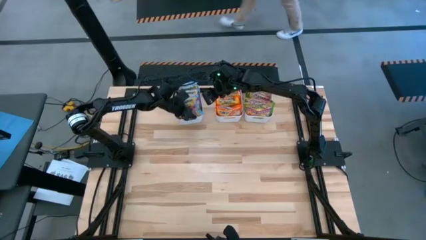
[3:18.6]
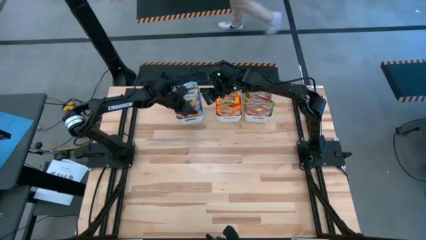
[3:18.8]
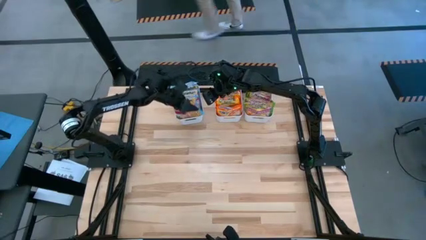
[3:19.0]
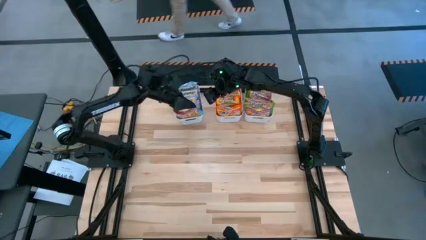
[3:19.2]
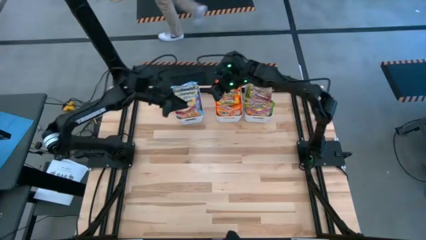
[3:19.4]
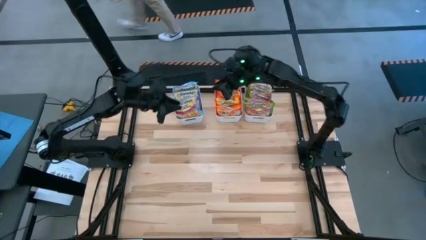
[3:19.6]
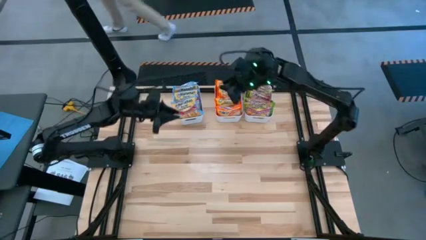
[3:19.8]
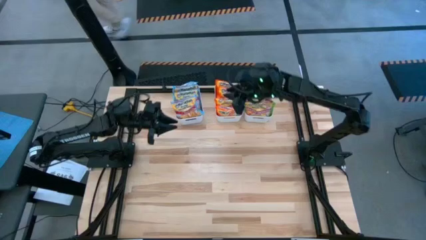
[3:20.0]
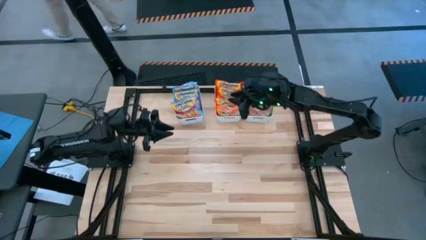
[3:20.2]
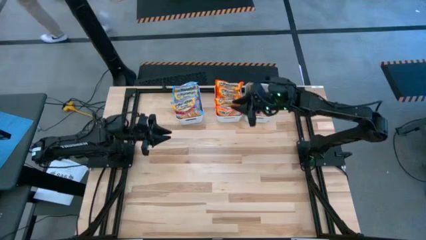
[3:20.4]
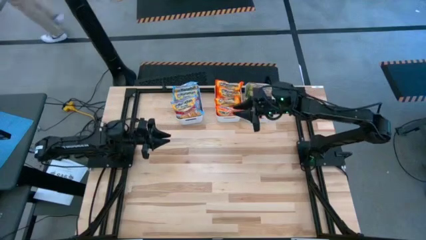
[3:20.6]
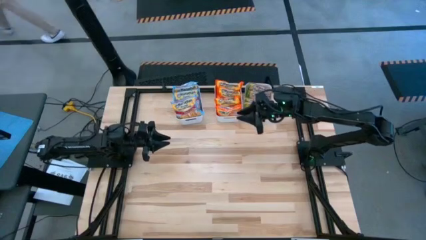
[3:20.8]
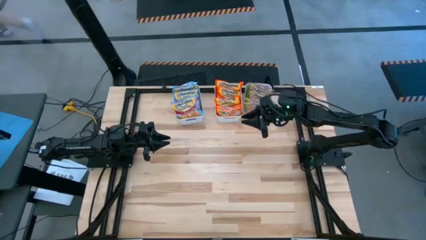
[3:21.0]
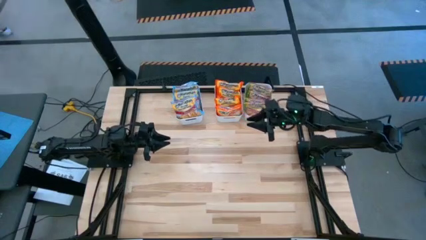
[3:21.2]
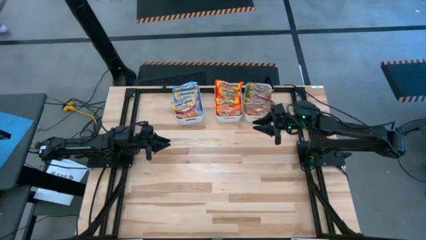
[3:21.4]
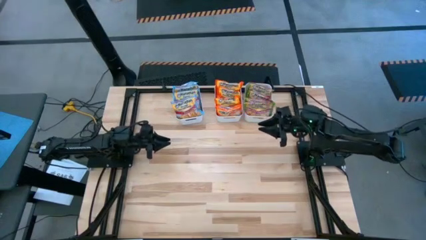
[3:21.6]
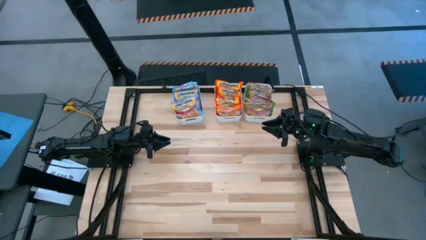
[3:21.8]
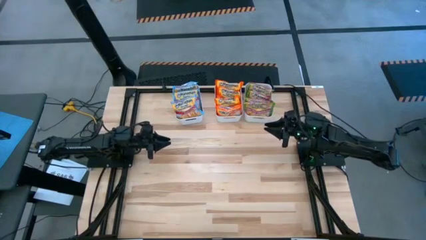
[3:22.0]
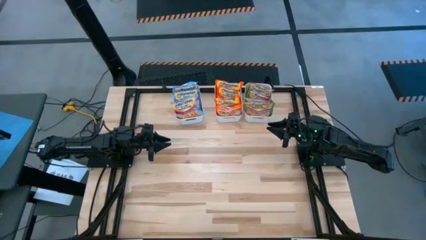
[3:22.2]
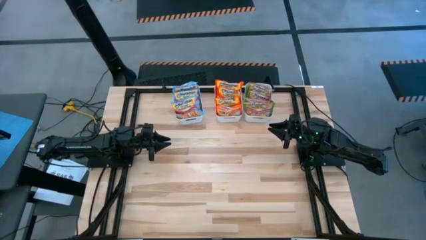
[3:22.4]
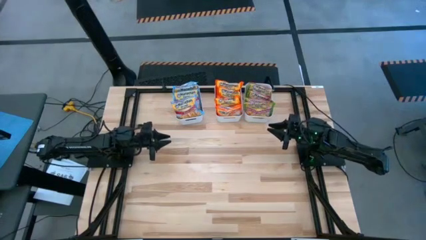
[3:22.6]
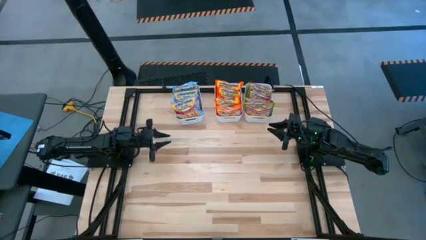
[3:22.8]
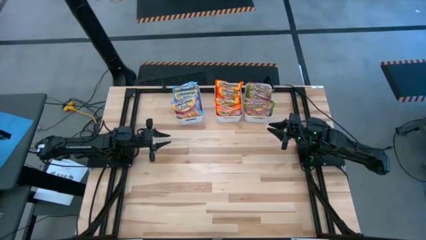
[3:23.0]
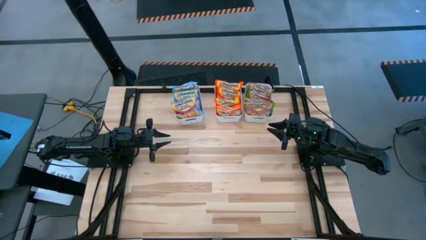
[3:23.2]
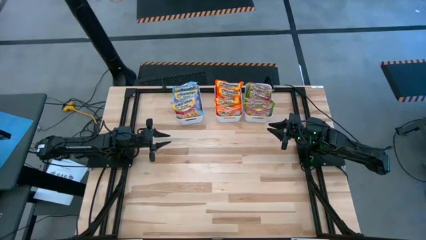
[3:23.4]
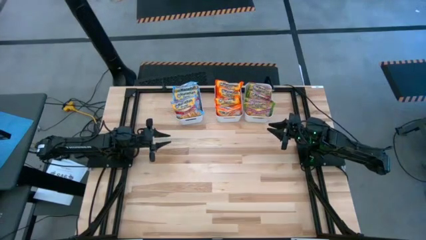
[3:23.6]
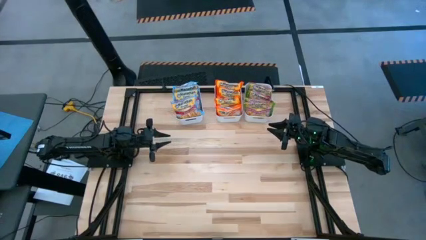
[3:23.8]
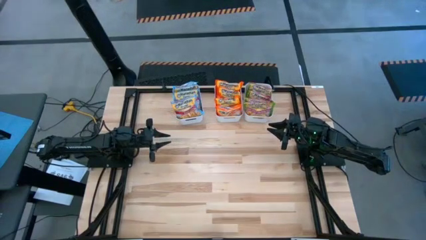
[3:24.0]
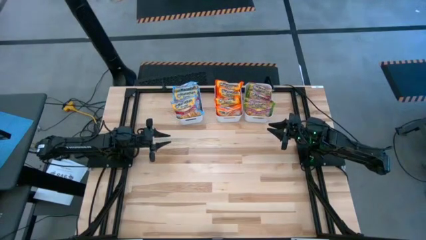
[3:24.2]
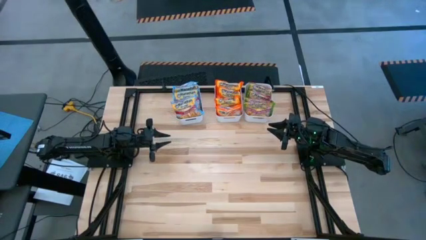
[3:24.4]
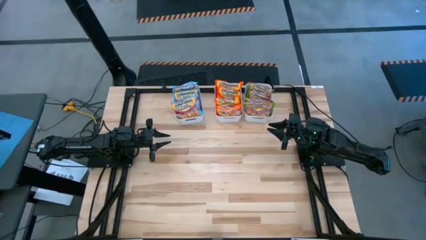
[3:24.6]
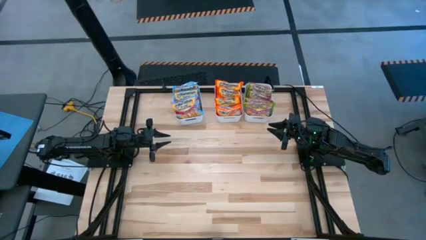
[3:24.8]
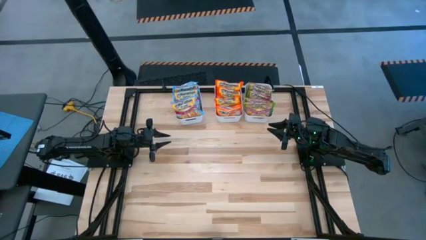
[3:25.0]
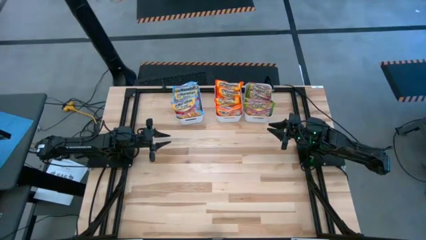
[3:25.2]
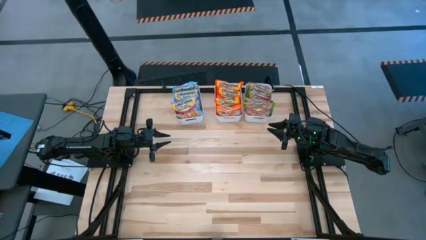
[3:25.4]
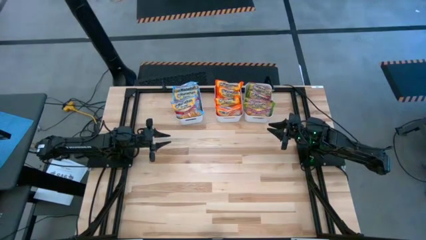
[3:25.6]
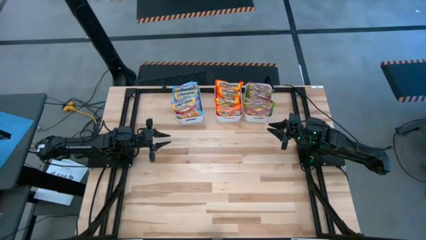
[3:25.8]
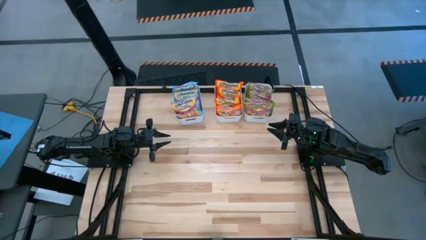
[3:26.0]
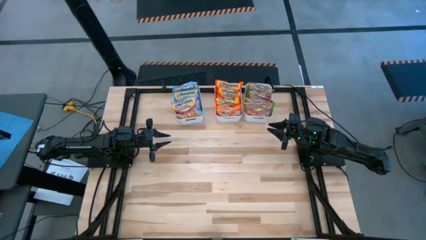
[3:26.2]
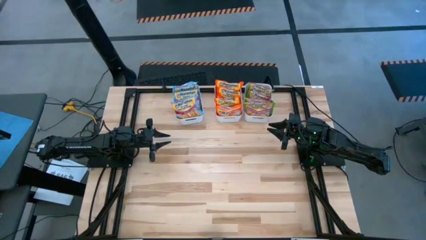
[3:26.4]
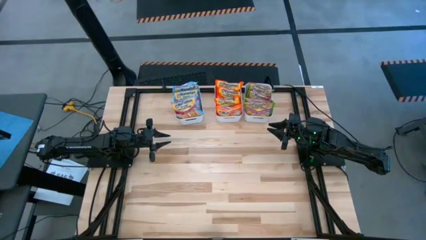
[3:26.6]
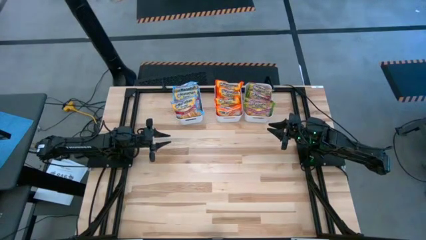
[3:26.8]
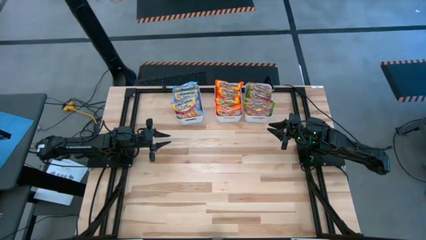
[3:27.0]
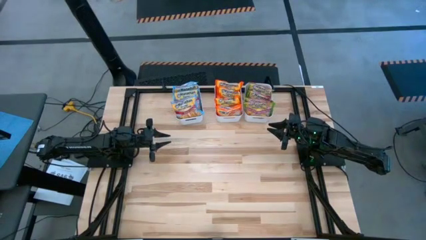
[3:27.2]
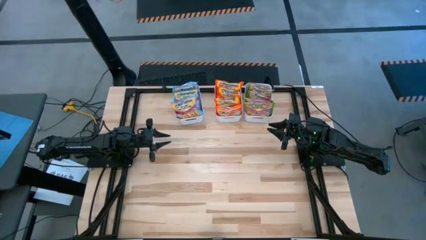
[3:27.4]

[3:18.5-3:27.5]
Task: Sort Maruchan noodles
Return To Home Position

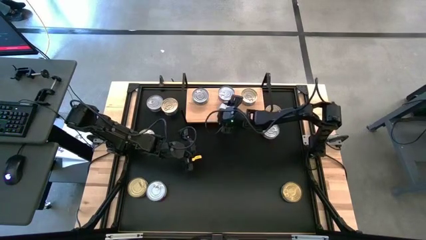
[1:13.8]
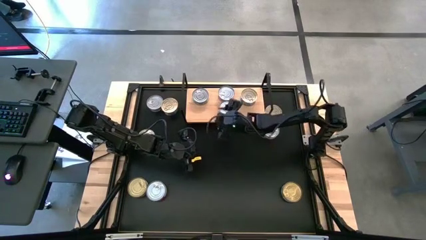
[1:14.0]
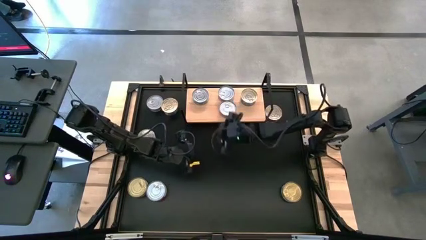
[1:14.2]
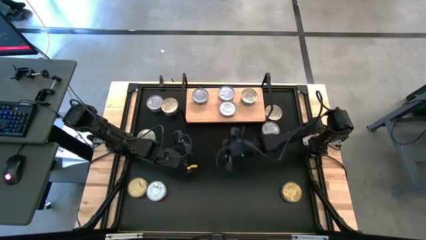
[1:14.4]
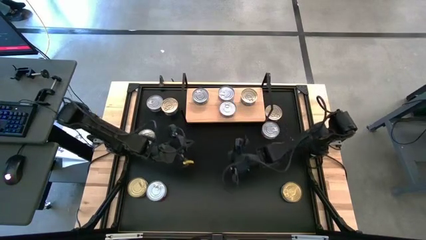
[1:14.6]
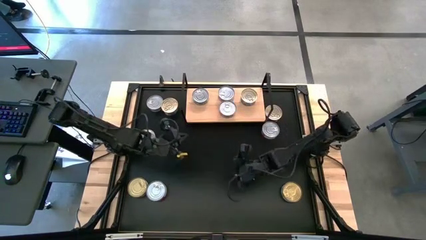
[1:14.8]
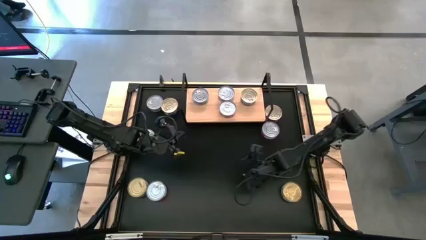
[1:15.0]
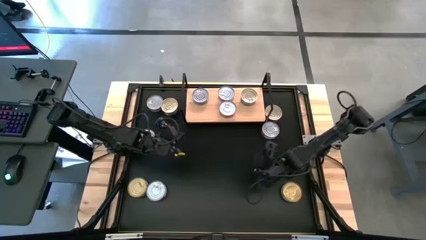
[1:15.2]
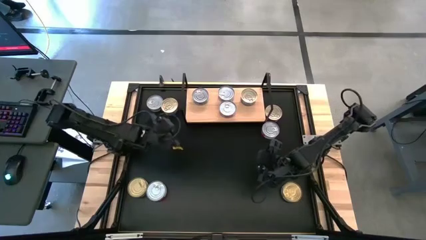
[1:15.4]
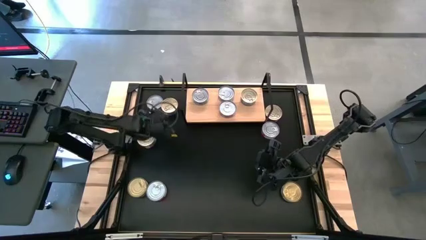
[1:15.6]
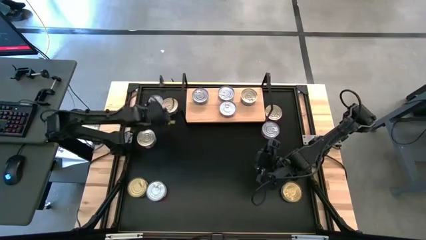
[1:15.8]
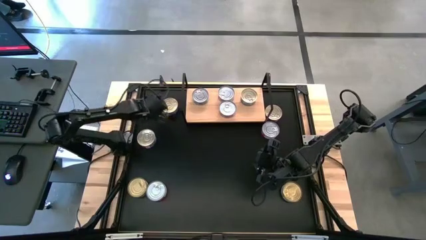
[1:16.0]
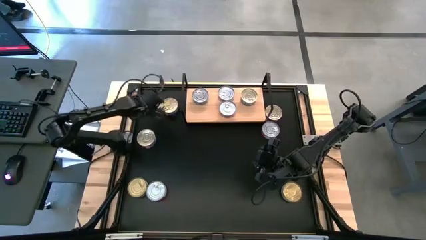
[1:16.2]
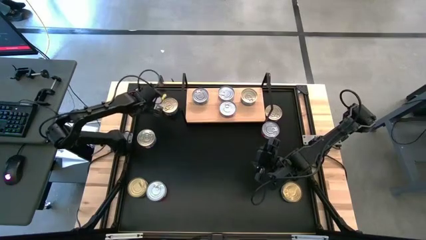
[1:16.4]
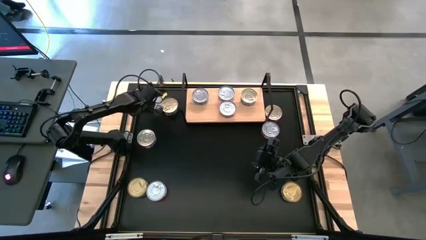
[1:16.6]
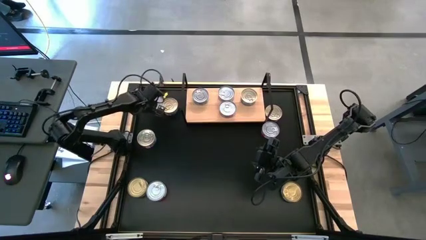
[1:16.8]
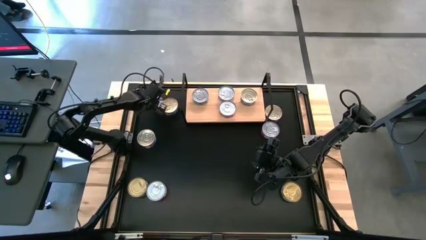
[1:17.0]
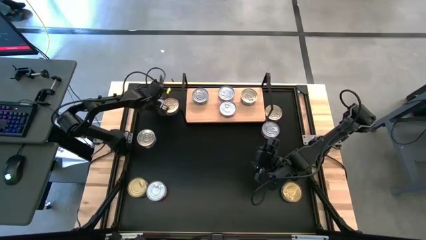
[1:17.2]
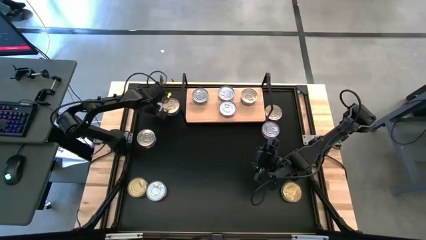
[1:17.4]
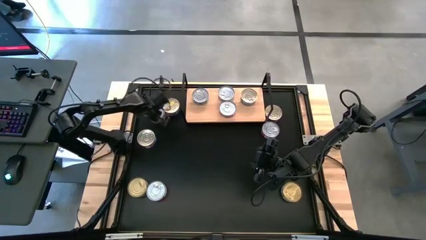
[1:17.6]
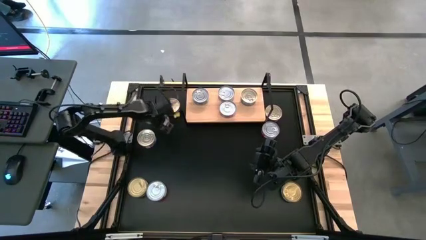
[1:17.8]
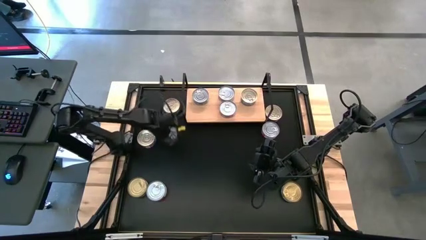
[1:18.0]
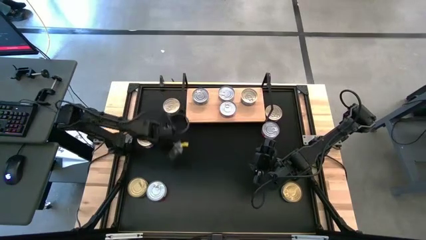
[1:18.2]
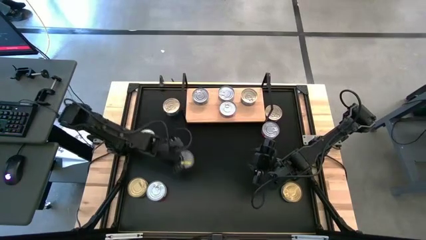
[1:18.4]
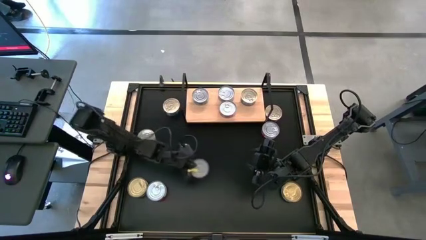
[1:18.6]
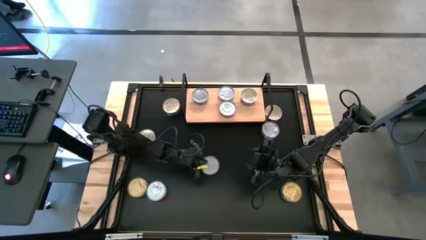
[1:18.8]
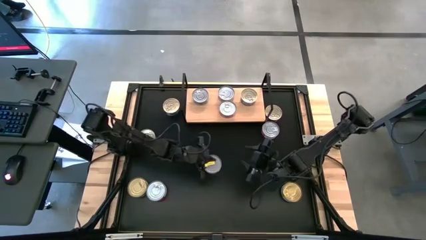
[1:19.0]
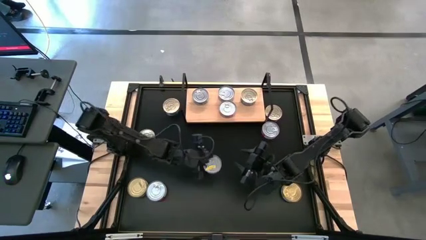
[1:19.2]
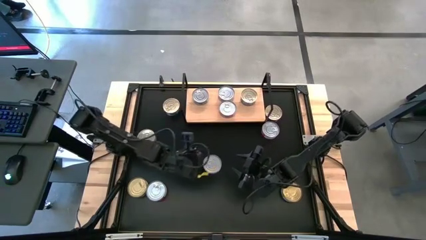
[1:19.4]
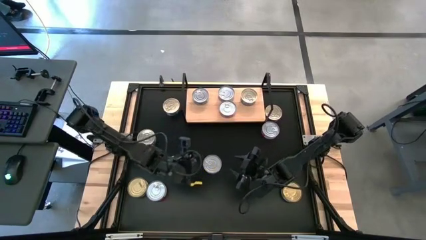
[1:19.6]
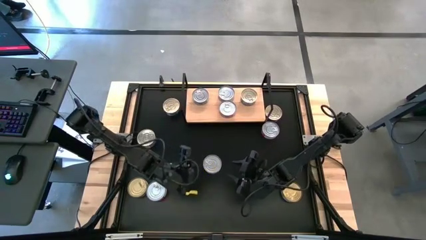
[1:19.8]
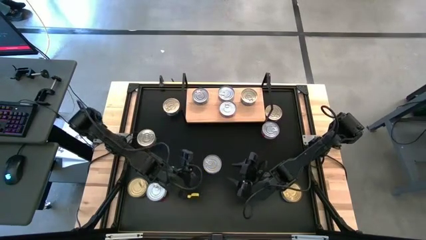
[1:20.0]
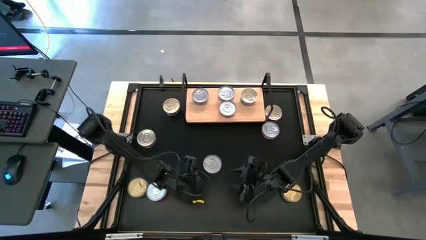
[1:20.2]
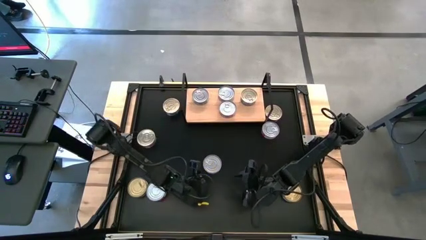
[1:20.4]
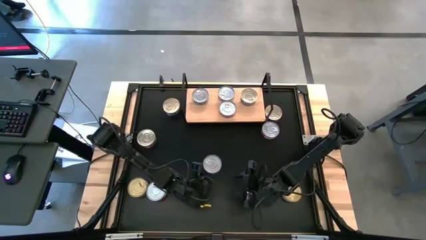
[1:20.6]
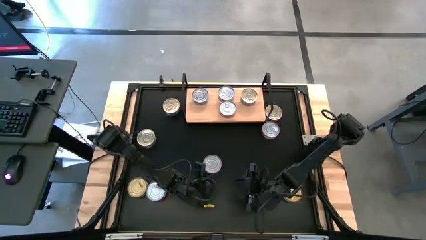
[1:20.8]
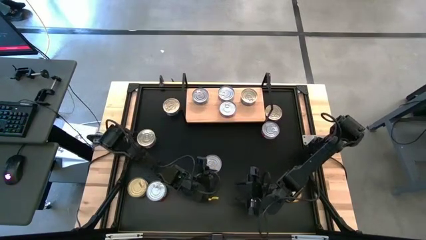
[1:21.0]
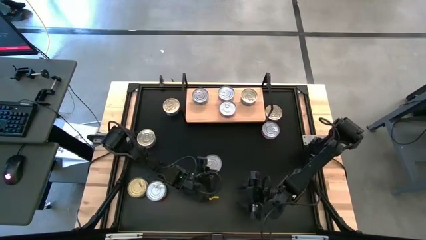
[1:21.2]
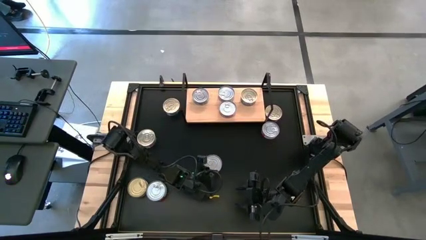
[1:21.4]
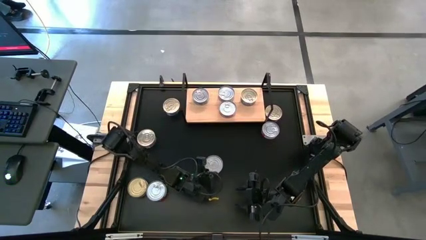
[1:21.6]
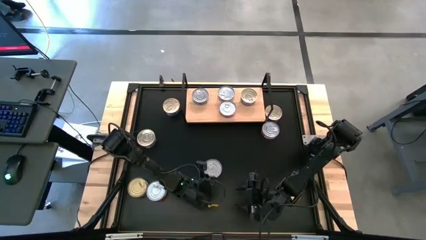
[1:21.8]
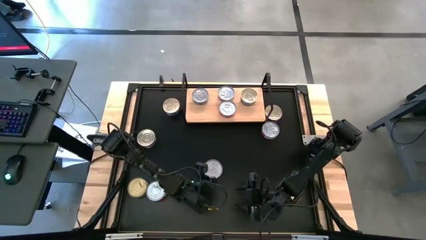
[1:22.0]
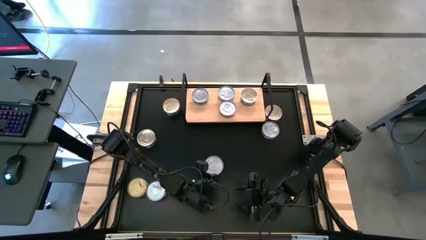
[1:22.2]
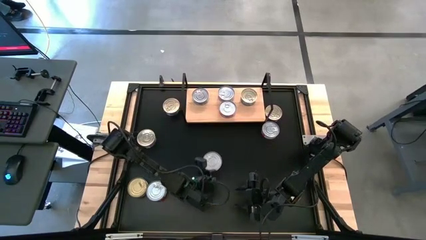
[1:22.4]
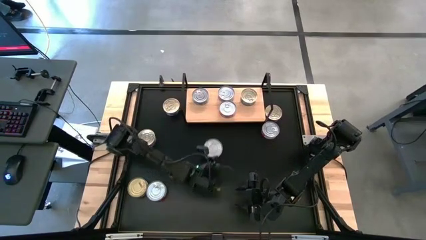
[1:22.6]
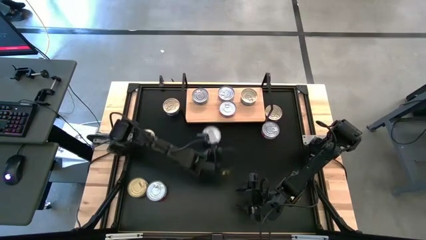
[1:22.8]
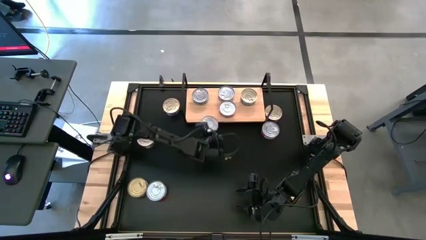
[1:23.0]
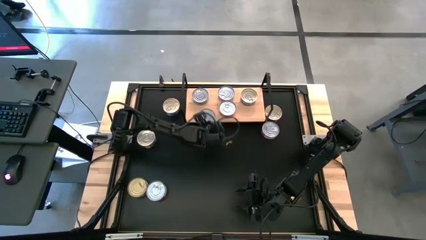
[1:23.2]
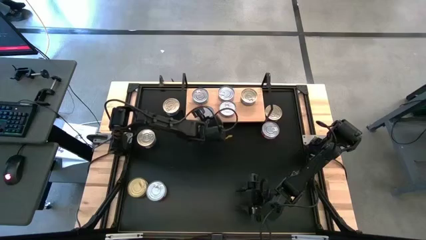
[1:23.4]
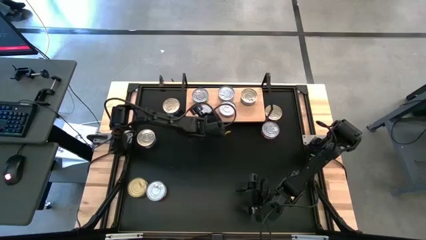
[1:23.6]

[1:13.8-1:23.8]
Task: Stack canned seafood by type on shelf
Put the green tuna can on the shelf aligned with the other green tuna can
